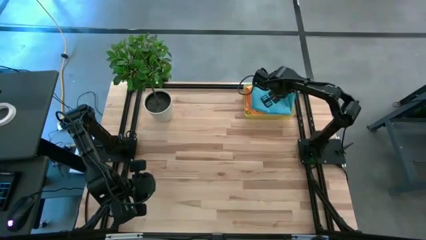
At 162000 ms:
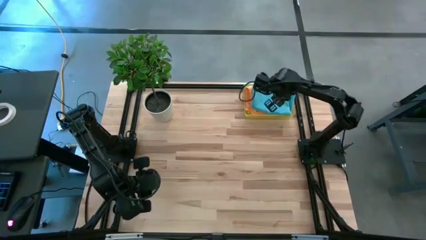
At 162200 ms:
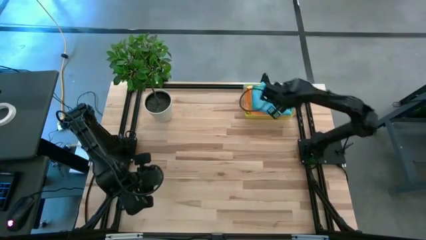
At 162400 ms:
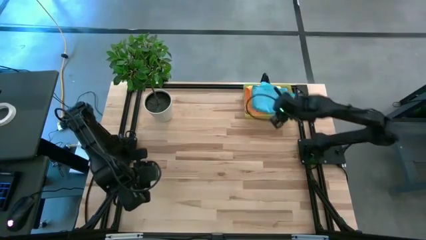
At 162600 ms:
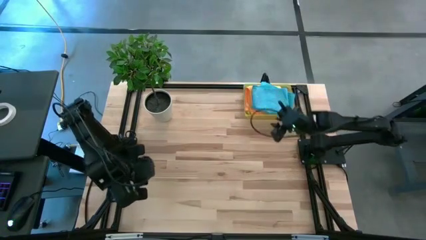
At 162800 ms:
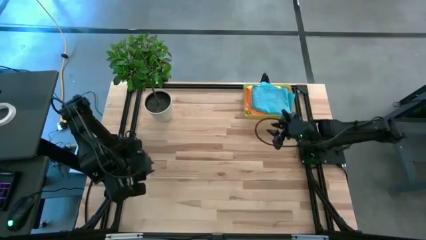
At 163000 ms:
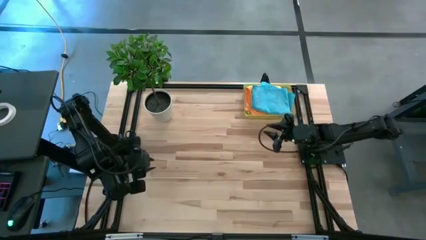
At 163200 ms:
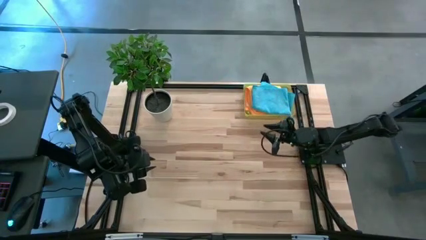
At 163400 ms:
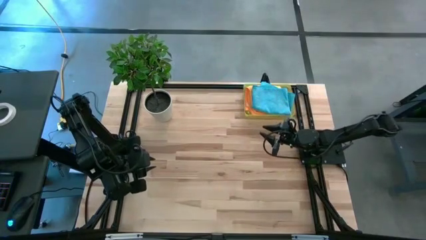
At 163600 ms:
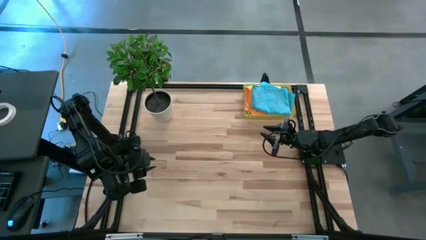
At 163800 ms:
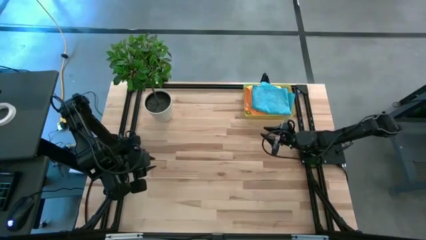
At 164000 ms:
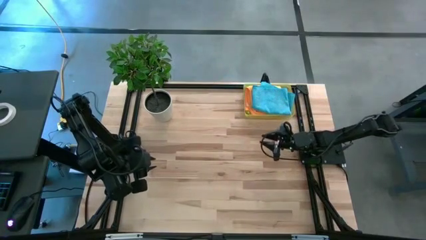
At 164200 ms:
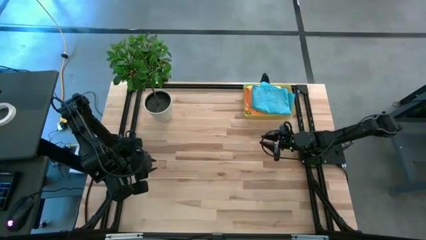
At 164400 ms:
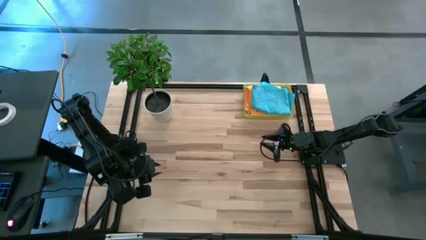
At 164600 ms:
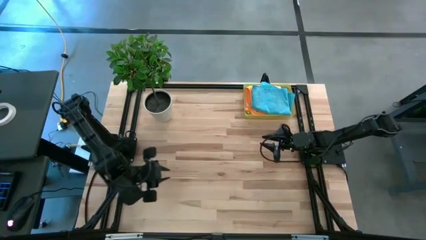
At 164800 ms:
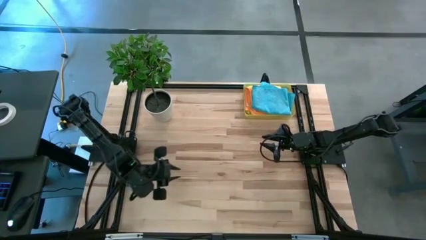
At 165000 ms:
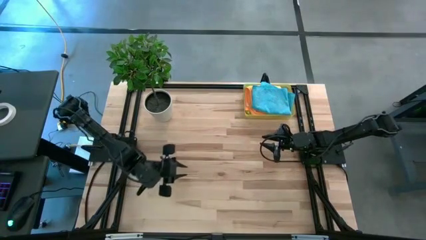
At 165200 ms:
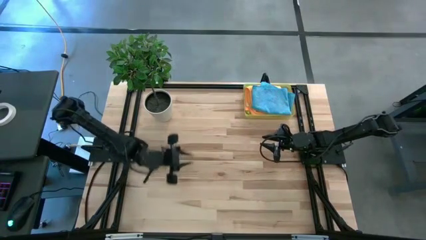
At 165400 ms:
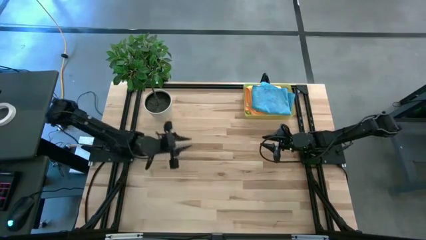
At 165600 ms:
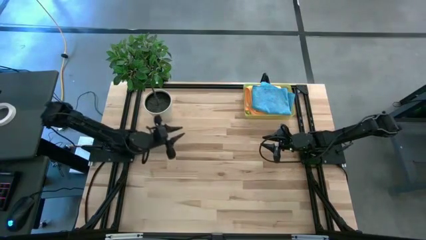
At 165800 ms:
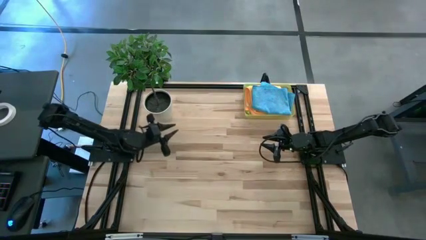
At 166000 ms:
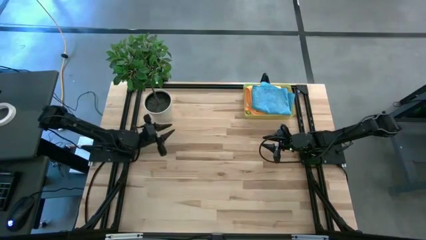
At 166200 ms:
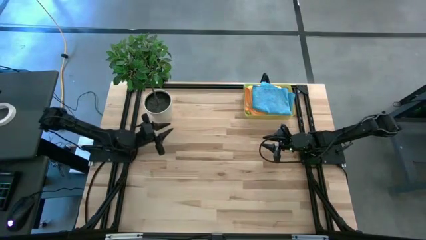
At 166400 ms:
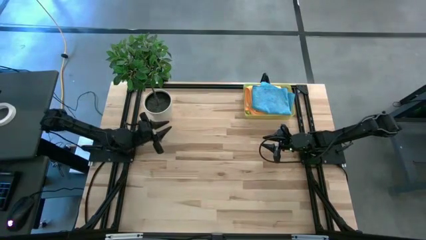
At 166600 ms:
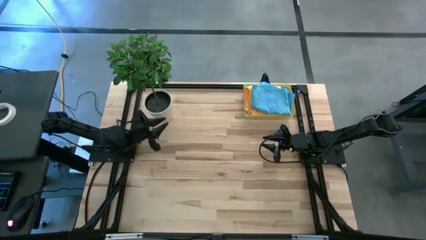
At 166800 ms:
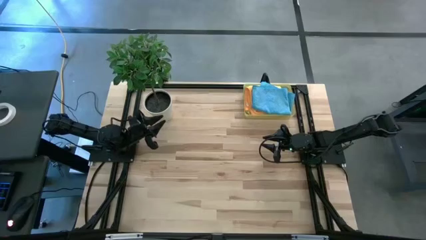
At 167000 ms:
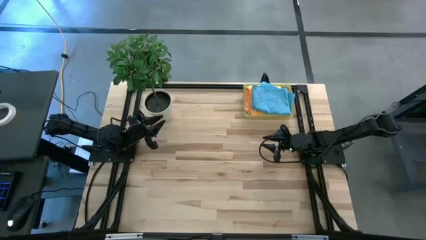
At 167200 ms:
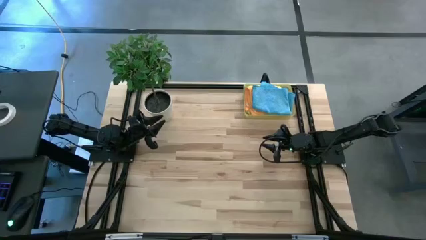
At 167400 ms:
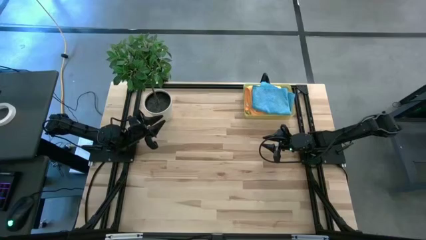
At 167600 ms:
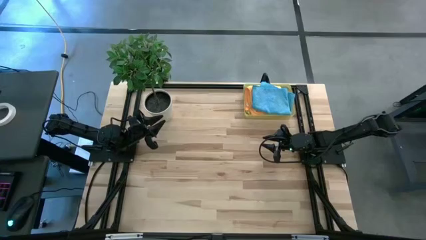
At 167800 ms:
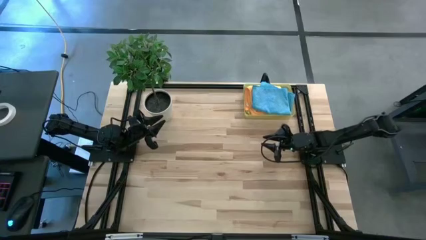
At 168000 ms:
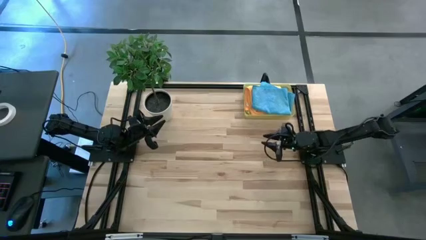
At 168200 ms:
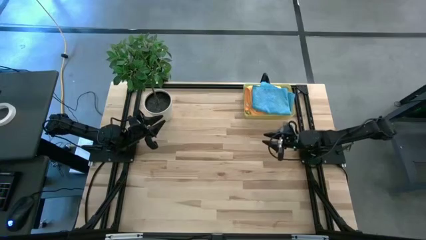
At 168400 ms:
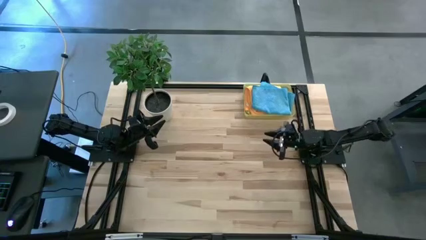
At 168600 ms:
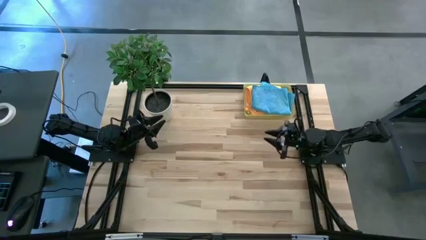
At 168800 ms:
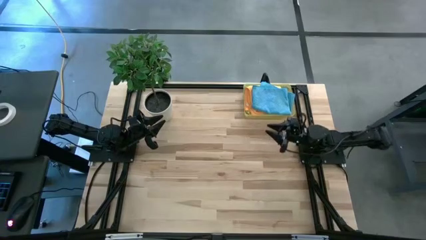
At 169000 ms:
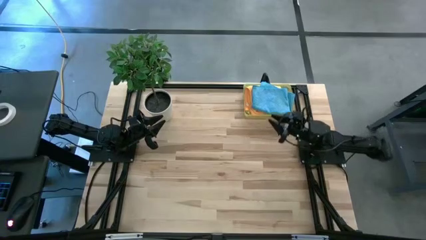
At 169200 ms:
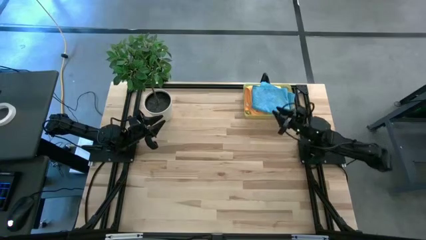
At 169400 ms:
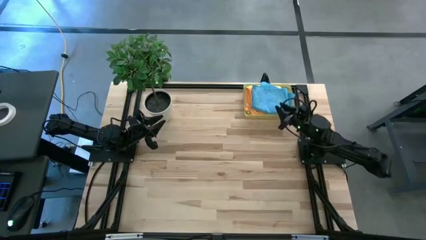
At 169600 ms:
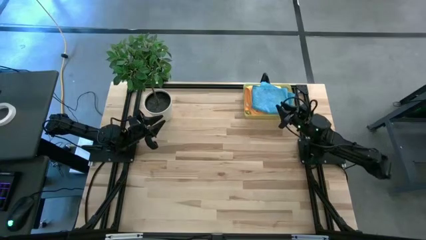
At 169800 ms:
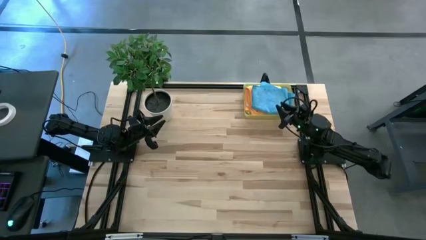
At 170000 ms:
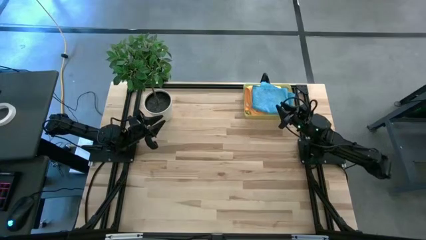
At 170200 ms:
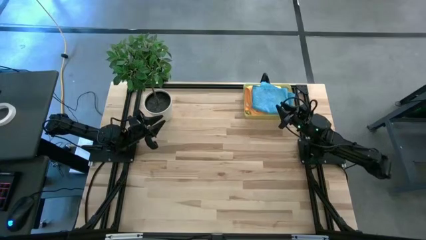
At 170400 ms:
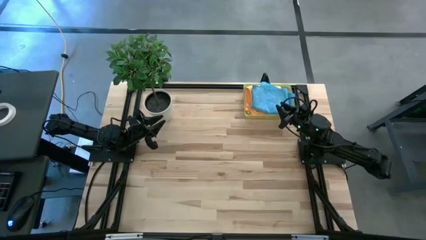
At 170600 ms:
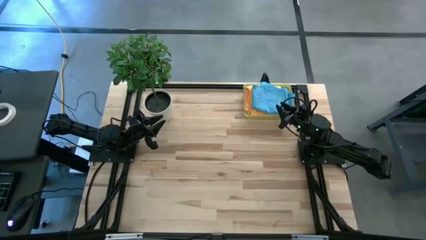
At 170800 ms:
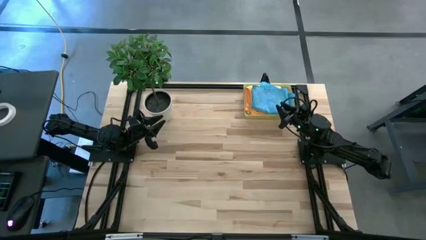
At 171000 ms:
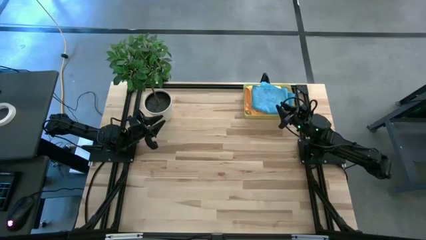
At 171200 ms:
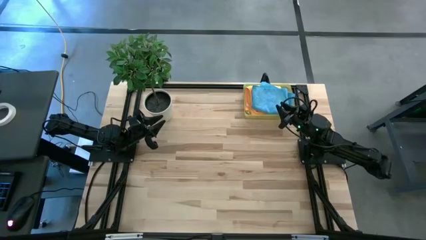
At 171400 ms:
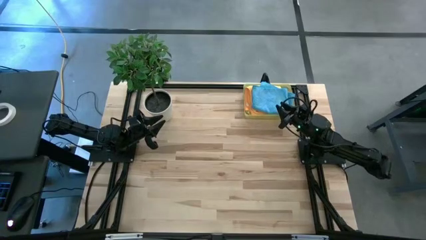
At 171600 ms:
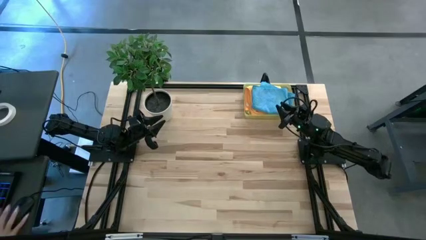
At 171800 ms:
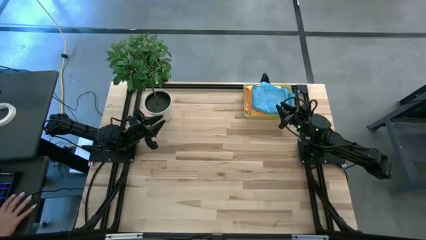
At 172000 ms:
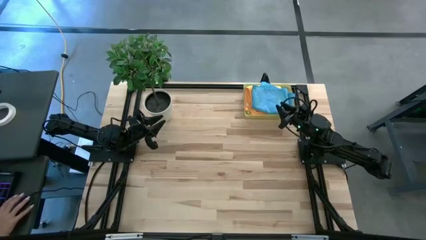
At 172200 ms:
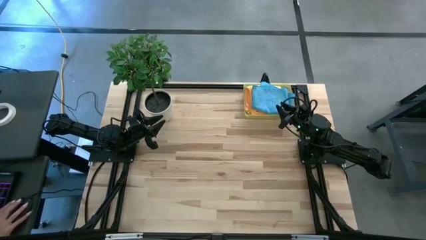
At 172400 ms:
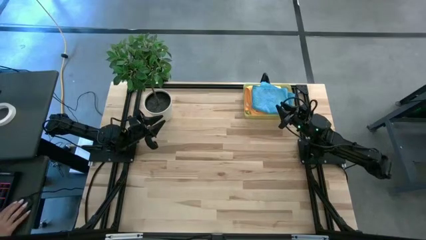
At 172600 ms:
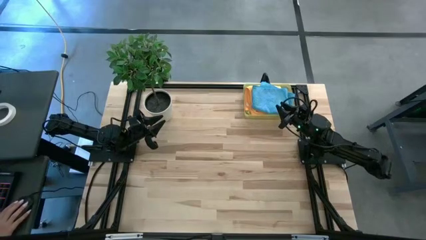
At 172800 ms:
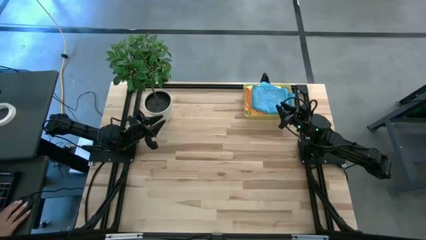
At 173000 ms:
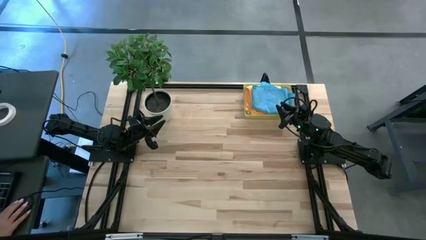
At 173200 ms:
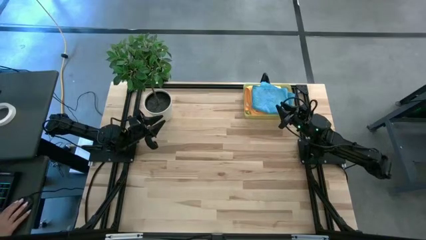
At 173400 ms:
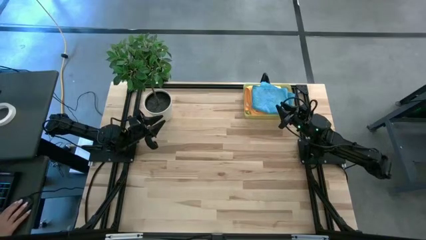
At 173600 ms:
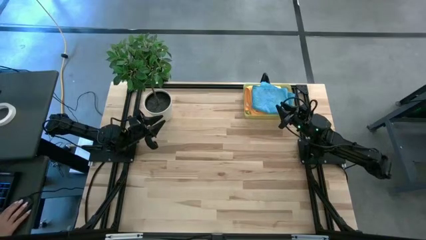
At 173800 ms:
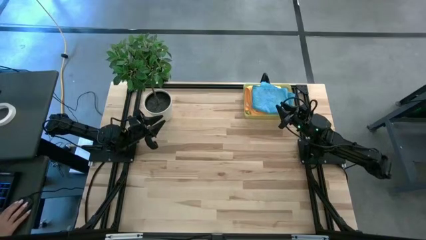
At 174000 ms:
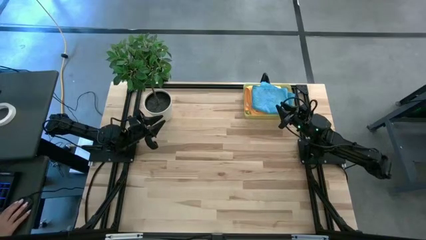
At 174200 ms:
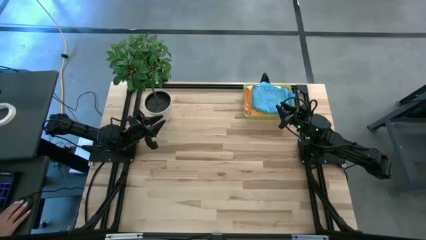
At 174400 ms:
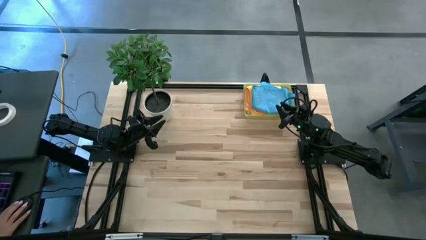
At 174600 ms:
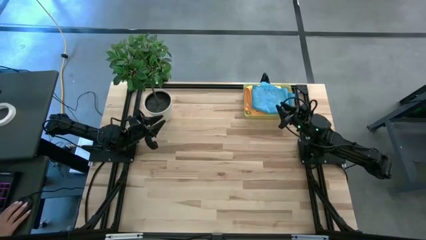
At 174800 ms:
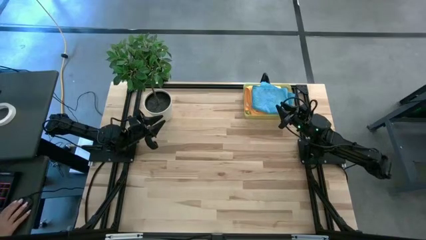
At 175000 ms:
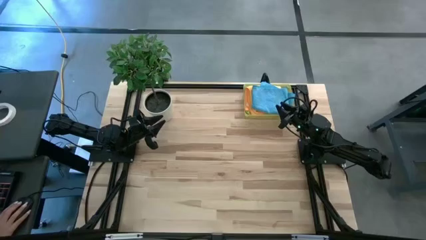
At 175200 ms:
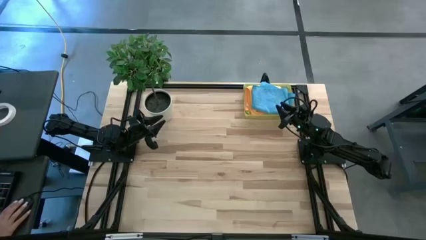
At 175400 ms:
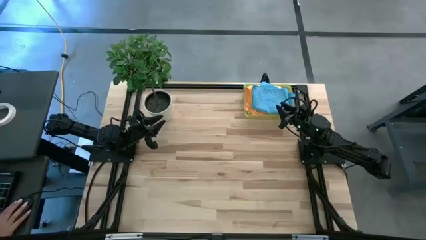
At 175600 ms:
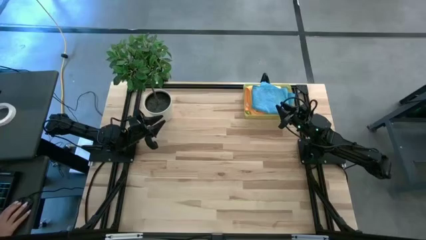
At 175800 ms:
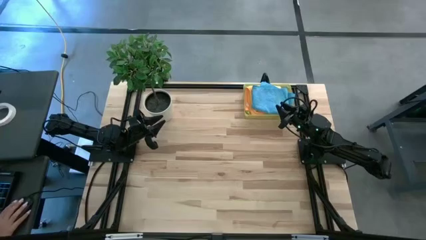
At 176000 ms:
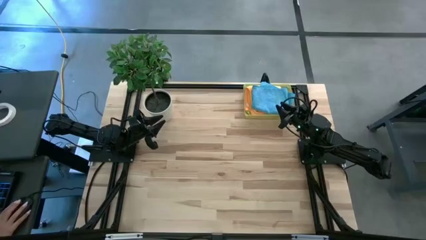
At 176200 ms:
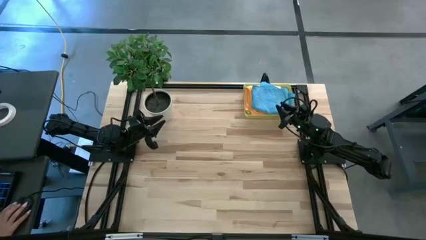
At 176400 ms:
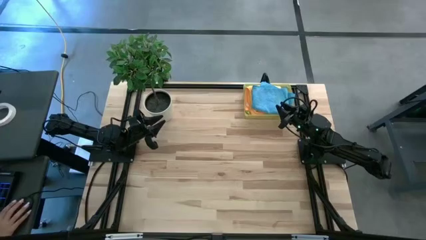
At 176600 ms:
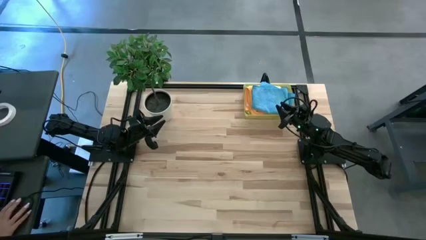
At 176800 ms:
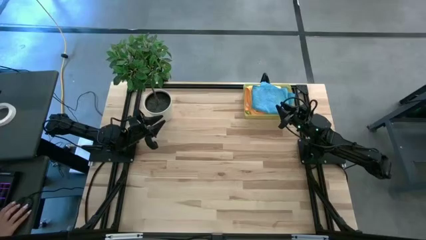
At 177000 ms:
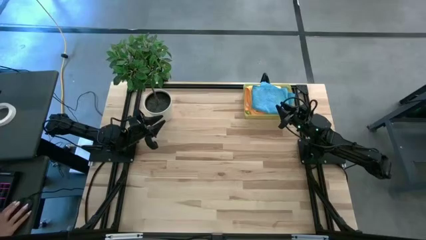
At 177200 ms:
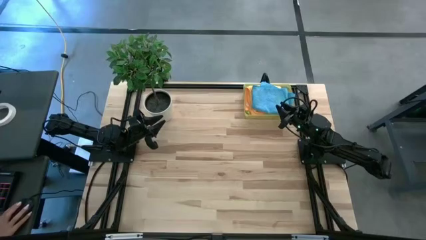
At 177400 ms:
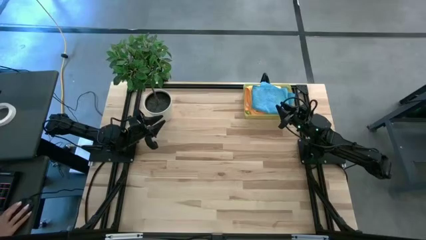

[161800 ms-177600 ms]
Task: Fold microfiber towels
Return to Home Position
